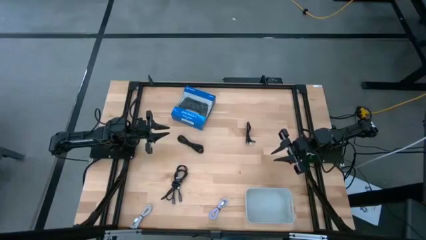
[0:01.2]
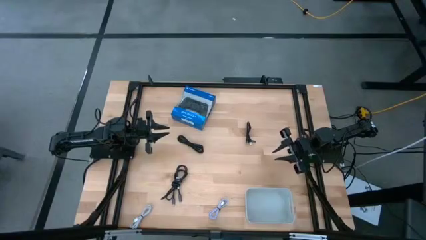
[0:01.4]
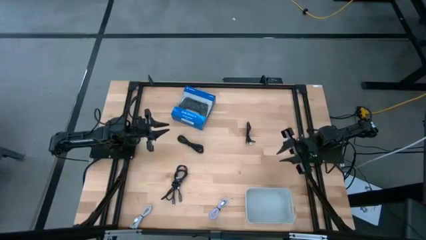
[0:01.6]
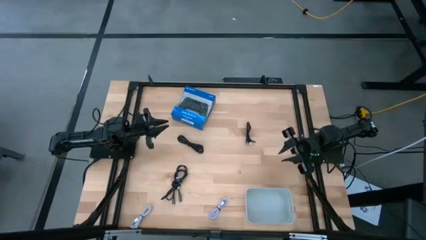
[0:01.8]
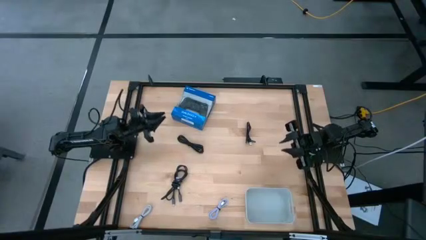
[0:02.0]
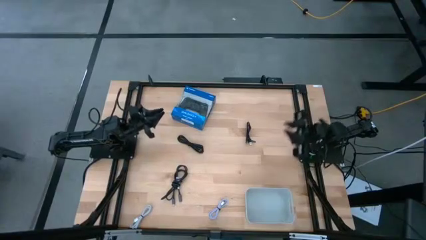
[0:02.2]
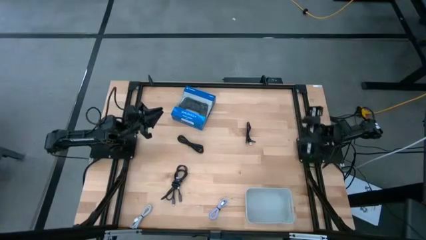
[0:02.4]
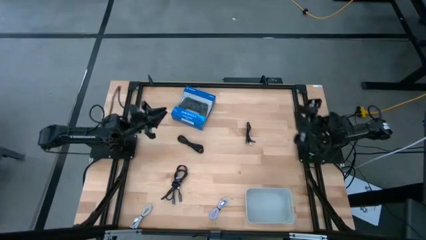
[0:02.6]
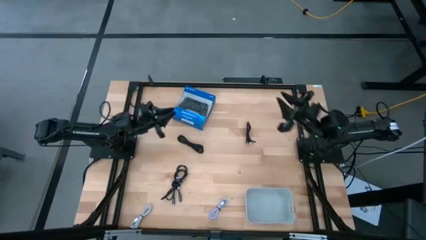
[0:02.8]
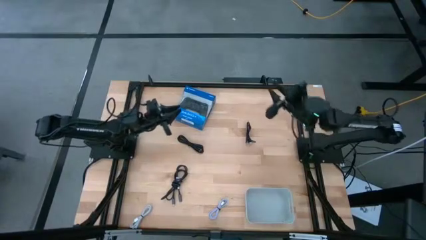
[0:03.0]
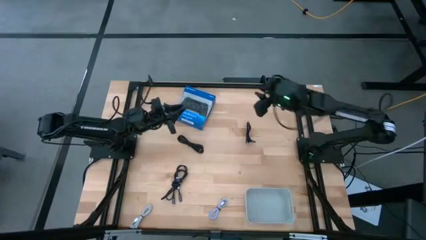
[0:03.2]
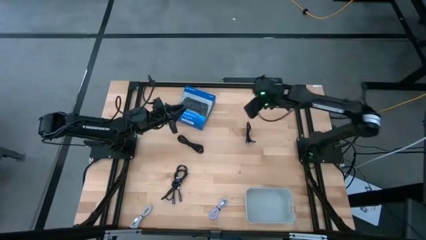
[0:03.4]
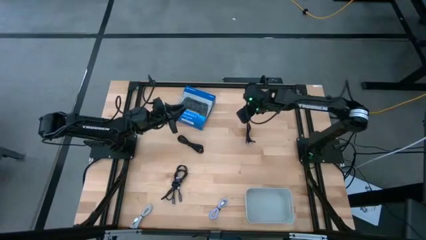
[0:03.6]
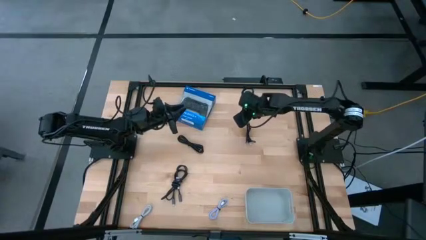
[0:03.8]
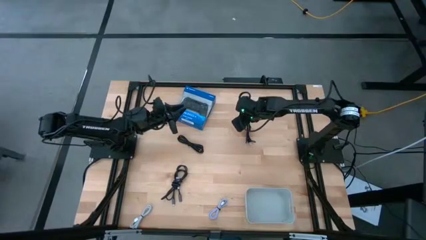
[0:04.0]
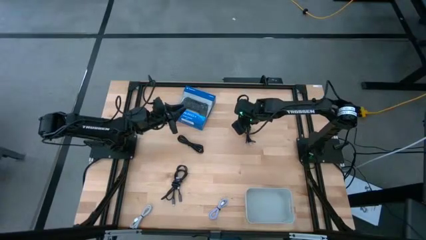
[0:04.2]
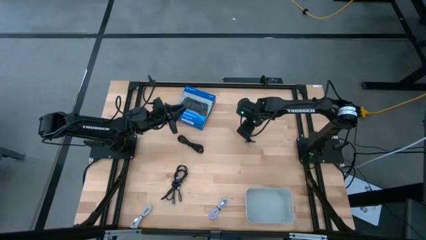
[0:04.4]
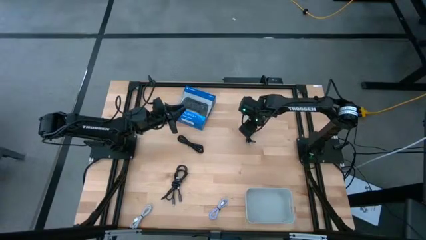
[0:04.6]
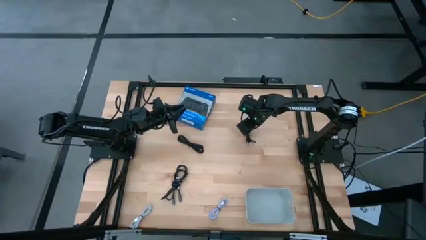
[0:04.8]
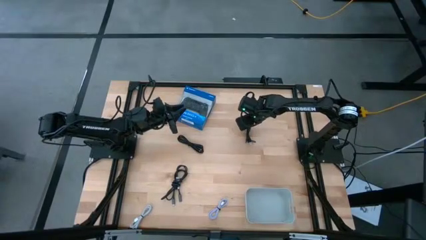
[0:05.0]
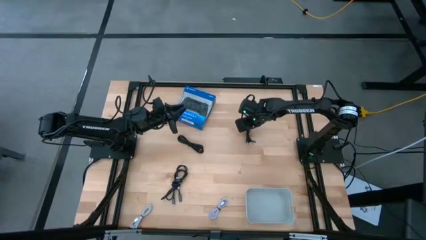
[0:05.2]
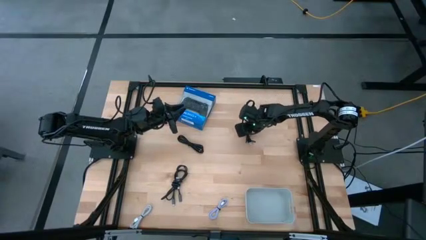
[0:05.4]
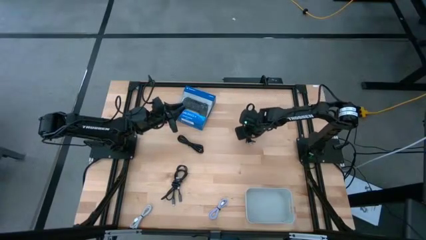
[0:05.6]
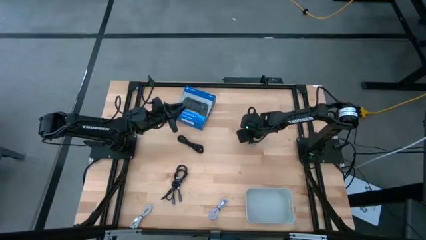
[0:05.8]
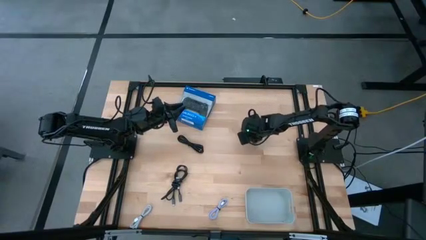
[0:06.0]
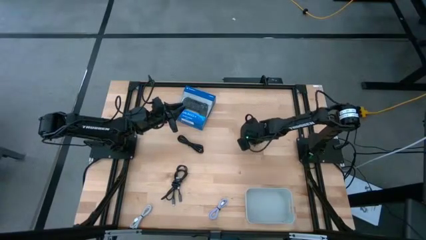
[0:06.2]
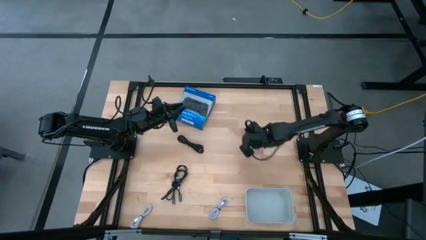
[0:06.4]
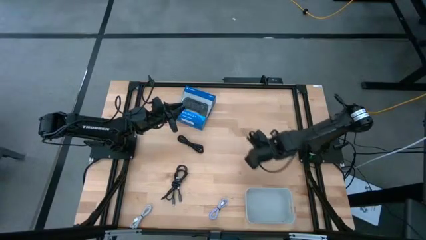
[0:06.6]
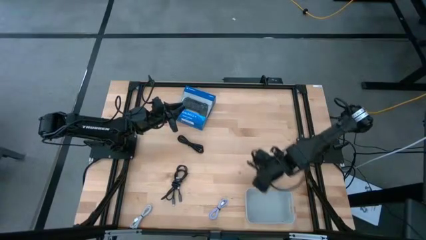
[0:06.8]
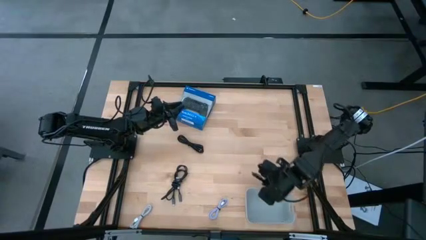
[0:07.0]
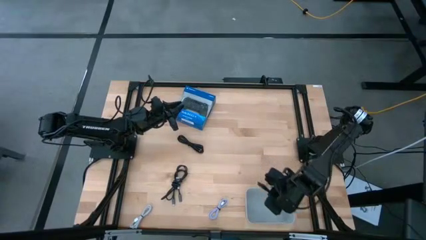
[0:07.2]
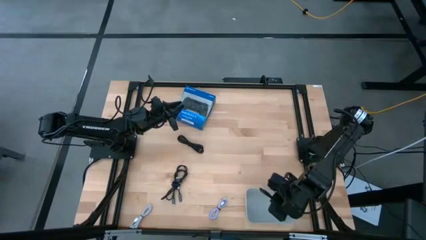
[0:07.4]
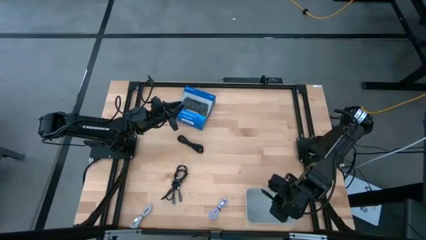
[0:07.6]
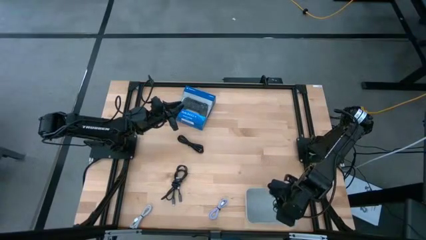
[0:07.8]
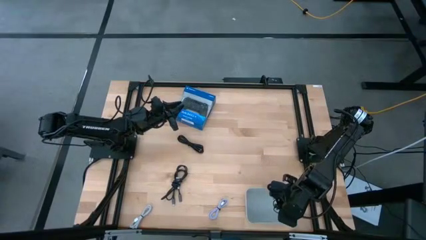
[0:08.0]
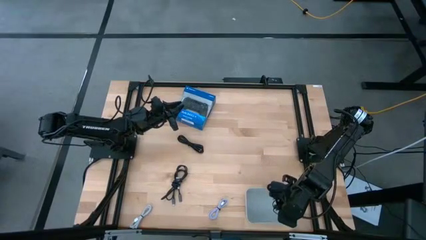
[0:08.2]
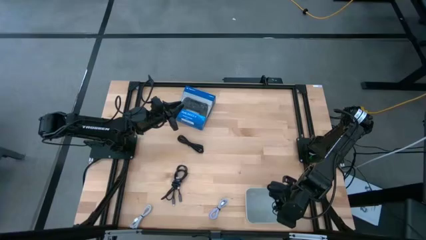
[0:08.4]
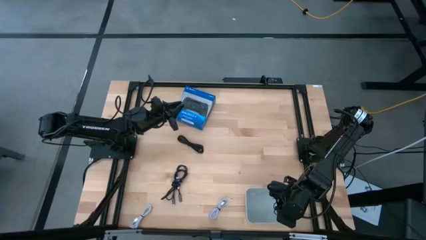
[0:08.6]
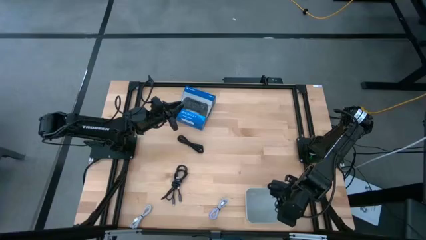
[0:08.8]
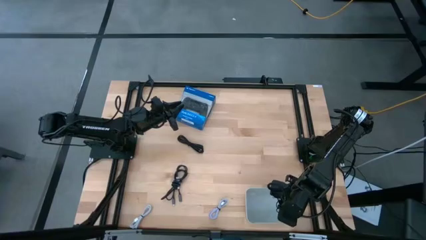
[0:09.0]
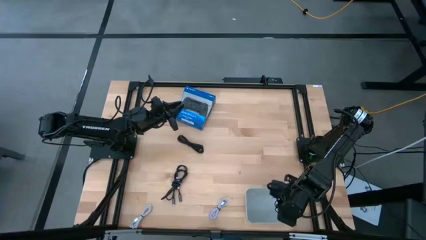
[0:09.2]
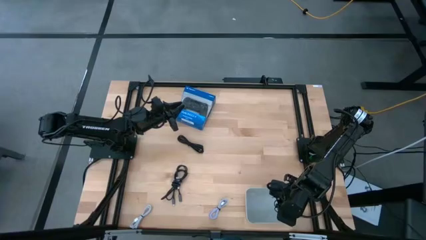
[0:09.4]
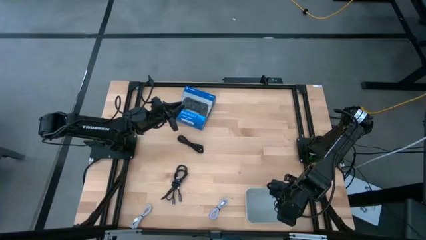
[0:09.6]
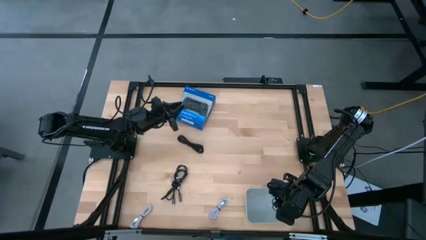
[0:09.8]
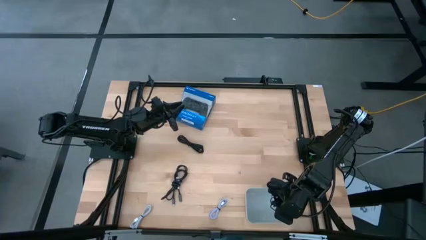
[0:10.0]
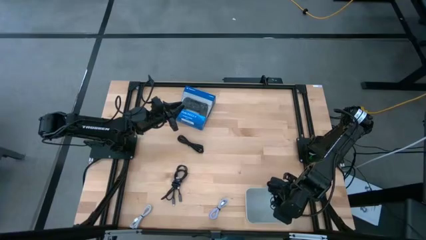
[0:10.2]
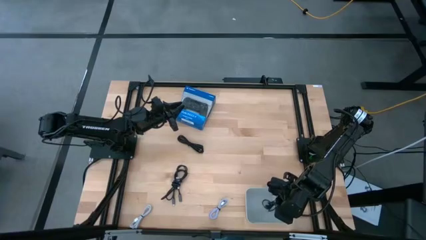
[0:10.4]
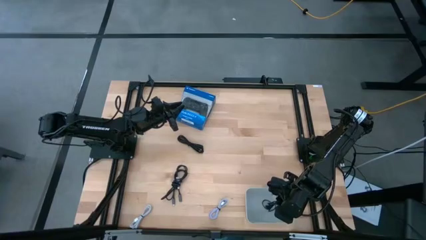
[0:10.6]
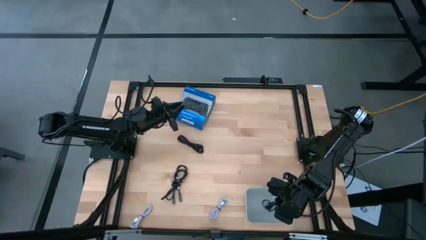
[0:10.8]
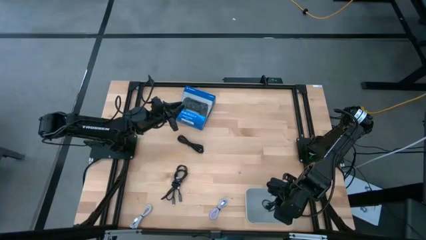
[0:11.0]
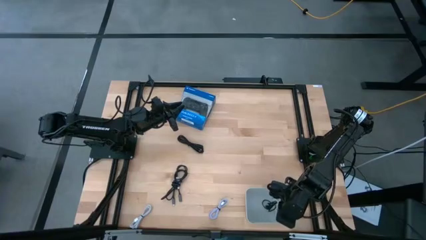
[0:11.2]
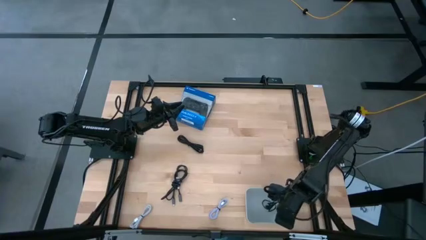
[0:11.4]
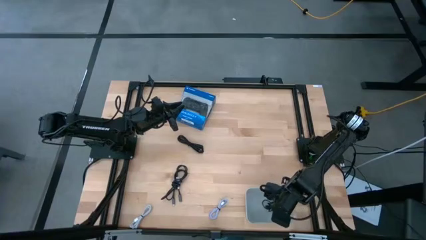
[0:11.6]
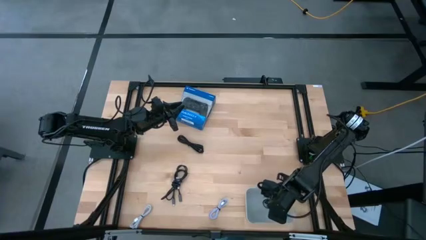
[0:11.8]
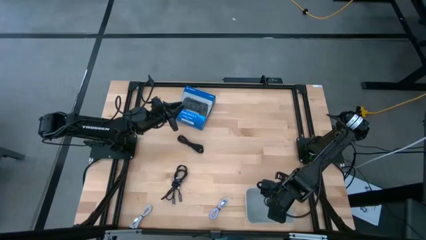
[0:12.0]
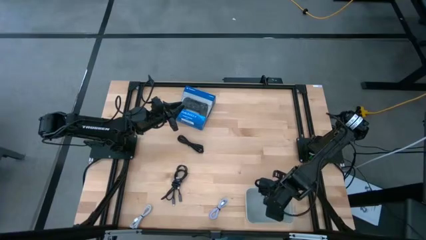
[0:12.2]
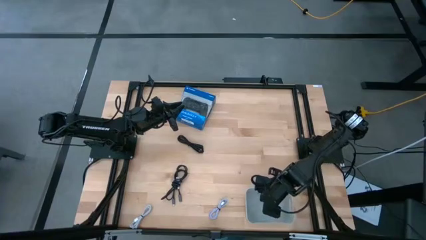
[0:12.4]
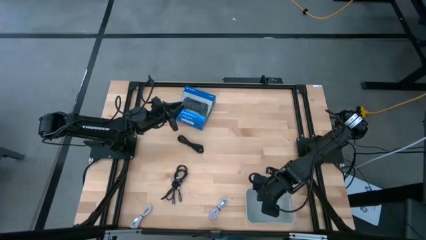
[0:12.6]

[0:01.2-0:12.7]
Task: Pick and place USB-C Cables
Put the top right black charger cable into the white bin

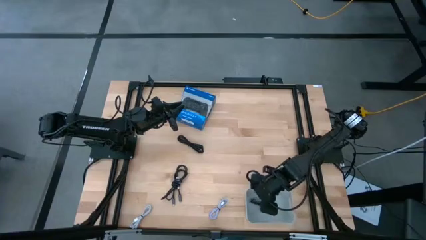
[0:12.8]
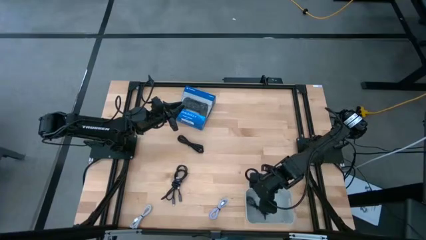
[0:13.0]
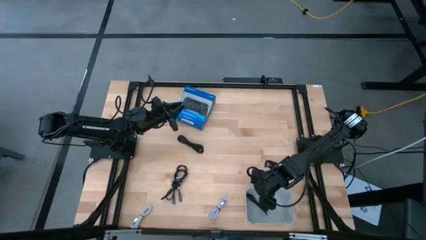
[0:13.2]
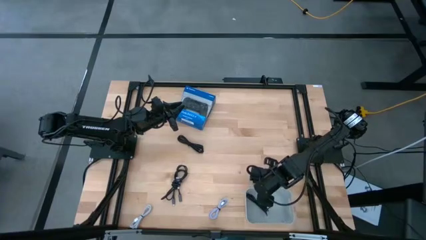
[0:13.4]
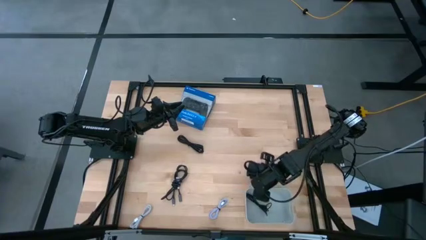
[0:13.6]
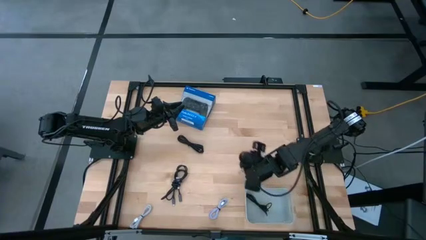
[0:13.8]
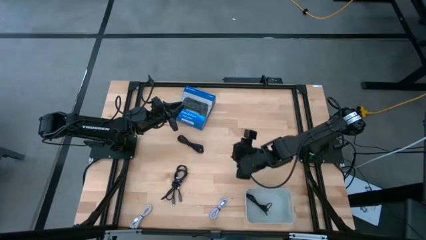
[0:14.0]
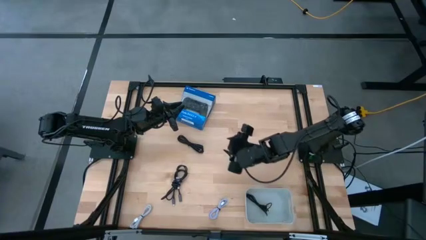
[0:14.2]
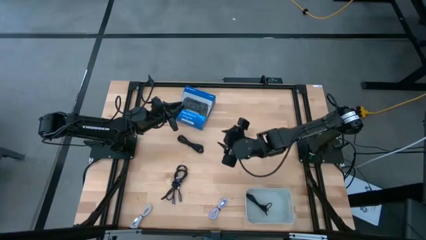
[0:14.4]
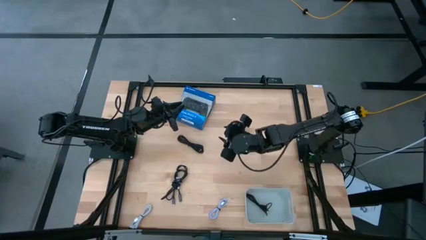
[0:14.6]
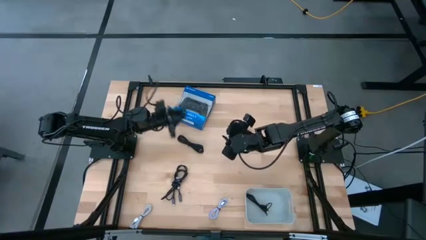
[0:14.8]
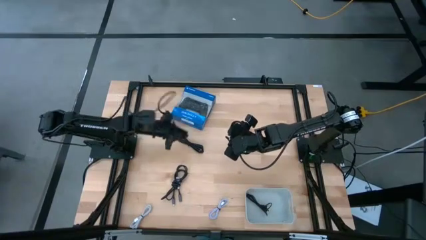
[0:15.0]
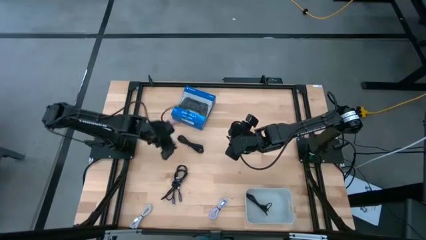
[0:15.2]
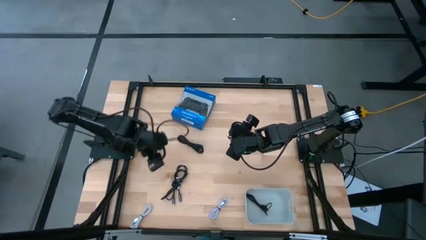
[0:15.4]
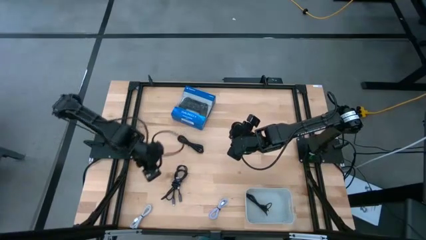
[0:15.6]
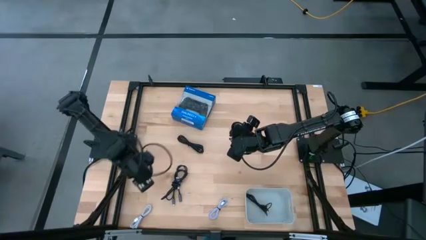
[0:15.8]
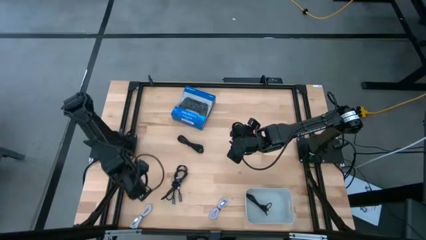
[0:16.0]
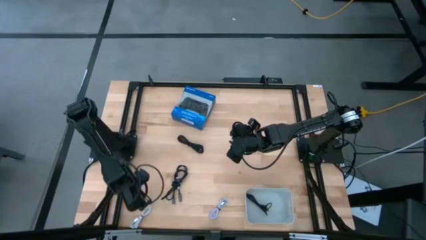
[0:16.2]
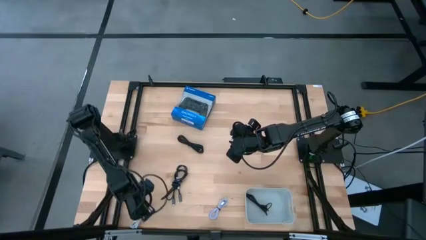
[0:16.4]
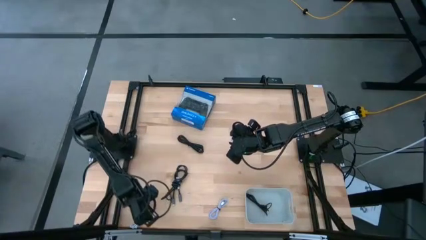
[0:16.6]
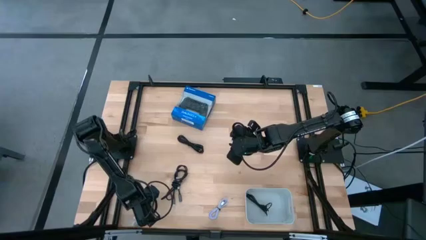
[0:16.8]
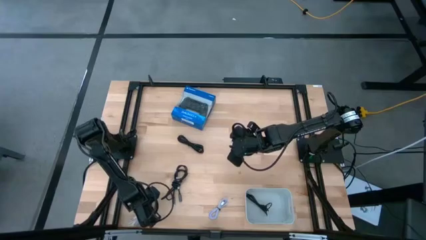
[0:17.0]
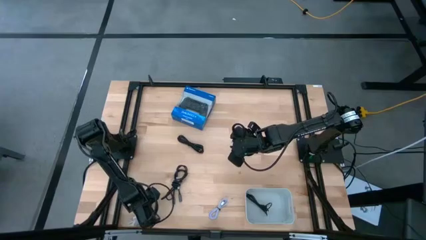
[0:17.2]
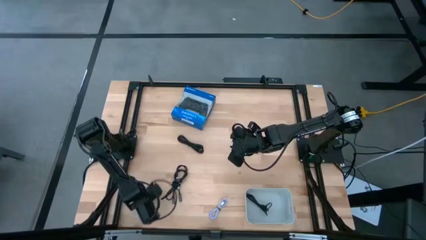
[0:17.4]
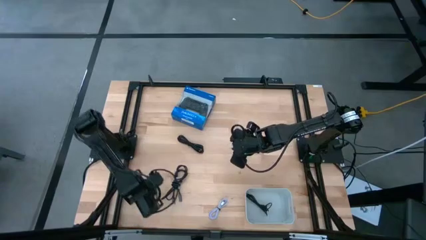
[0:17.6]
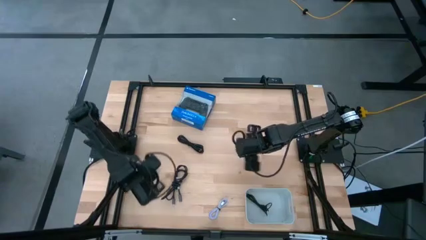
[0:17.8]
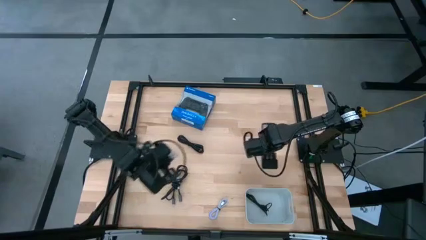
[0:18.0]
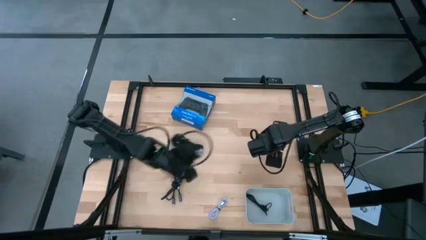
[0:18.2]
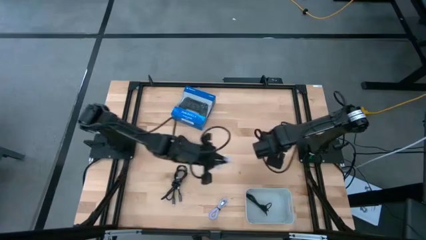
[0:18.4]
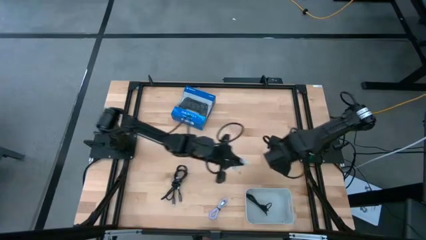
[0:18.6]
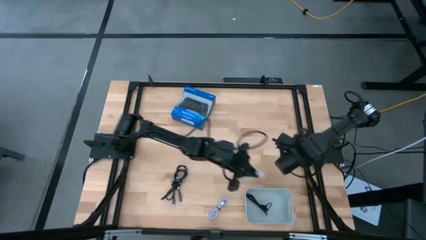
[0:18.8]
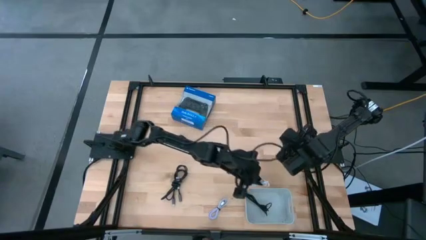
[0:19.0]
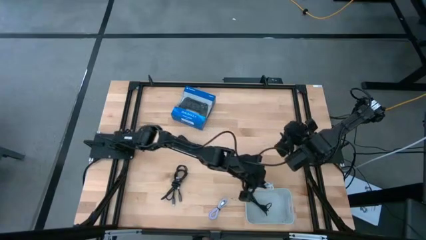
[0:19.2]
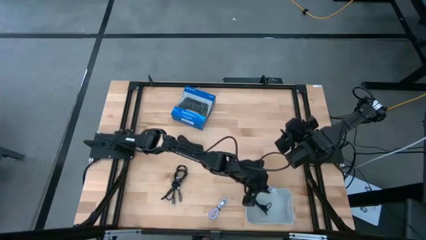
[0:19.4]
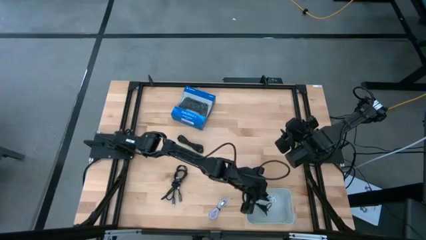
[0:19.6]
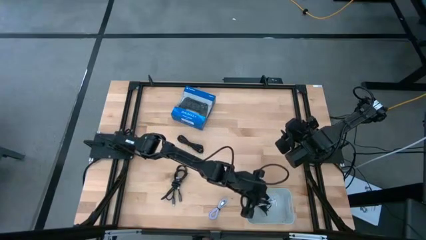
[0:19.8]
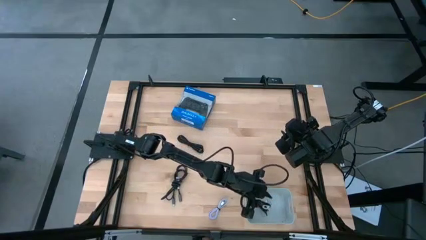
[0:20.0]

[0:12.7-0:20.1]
Put the left white charger cable into the white bin
